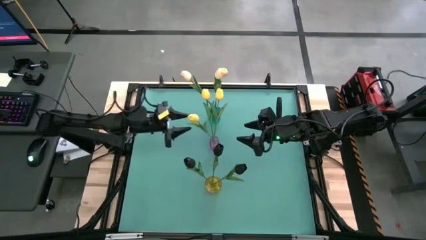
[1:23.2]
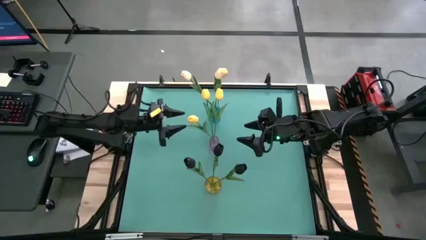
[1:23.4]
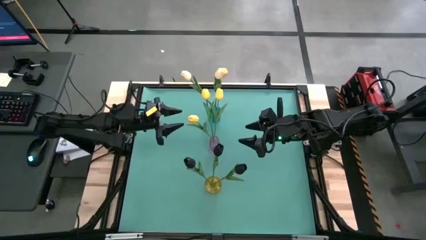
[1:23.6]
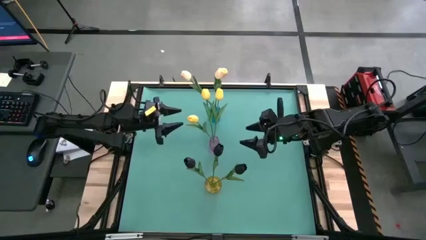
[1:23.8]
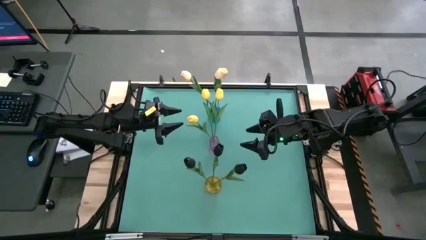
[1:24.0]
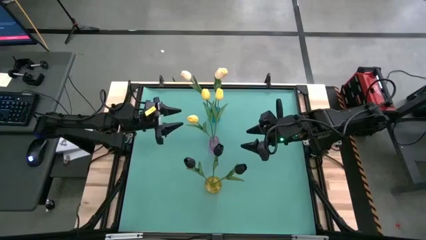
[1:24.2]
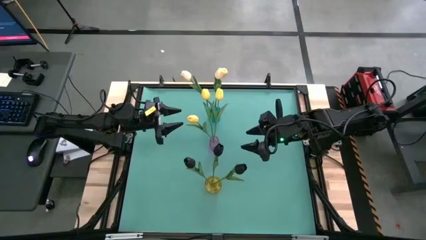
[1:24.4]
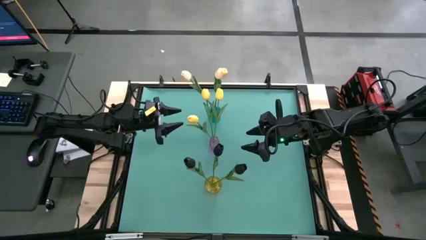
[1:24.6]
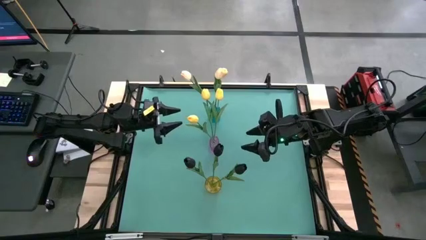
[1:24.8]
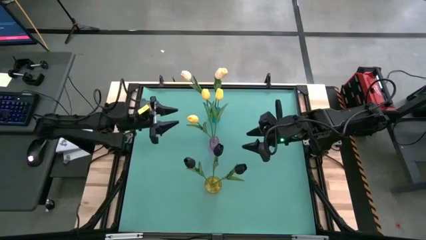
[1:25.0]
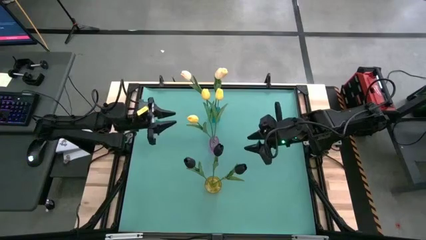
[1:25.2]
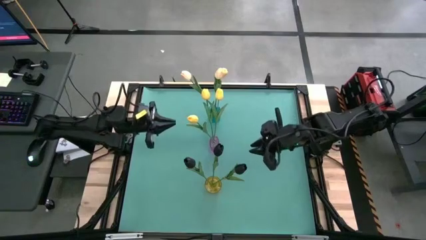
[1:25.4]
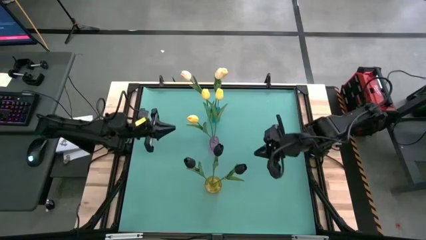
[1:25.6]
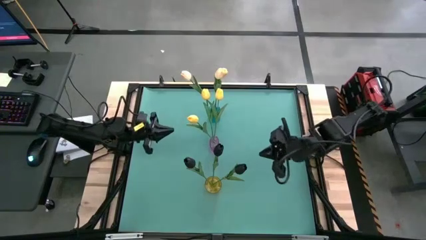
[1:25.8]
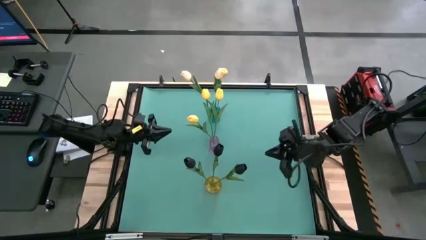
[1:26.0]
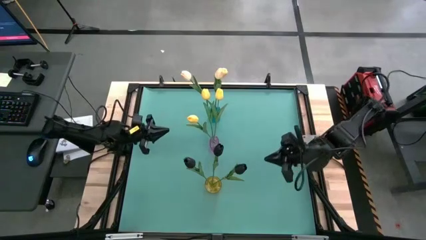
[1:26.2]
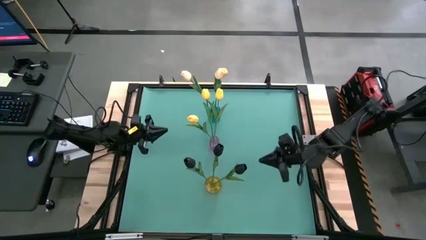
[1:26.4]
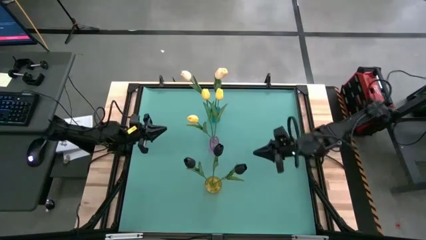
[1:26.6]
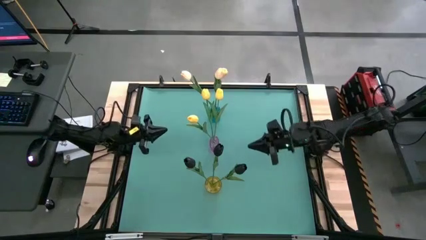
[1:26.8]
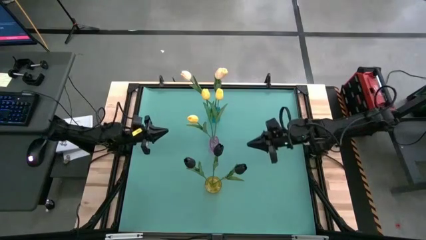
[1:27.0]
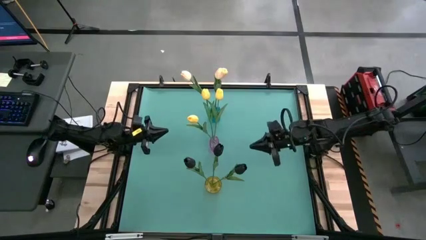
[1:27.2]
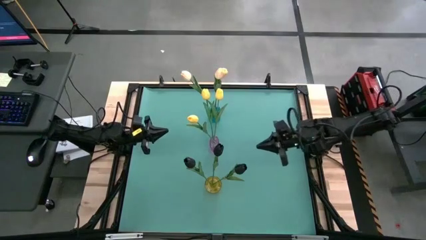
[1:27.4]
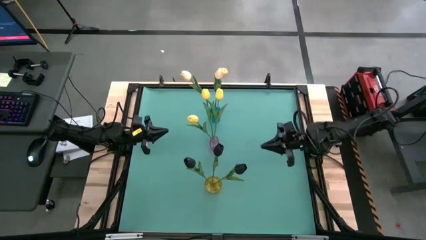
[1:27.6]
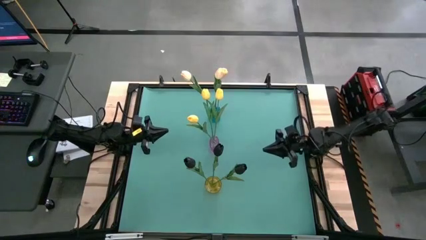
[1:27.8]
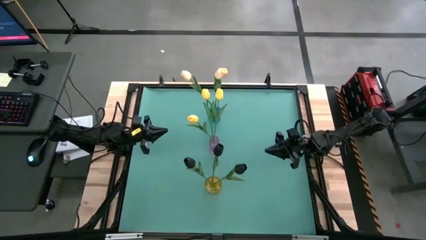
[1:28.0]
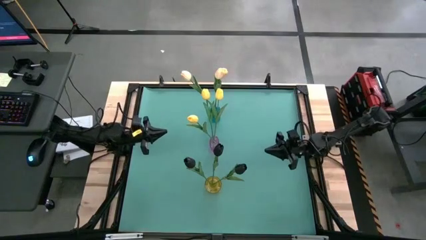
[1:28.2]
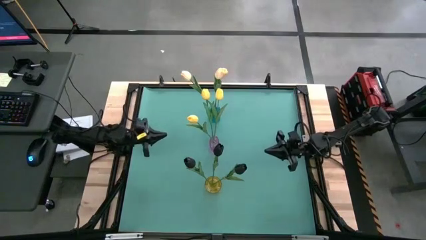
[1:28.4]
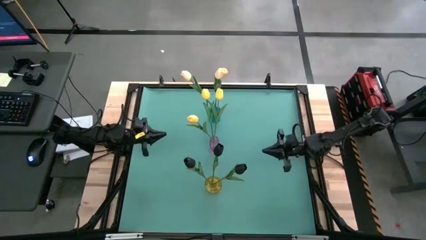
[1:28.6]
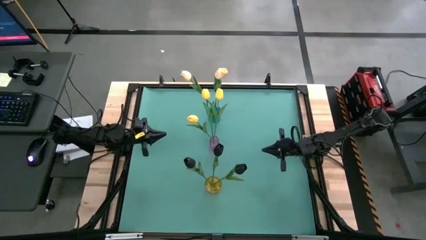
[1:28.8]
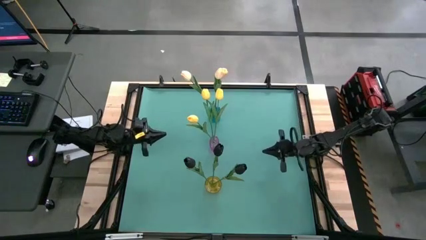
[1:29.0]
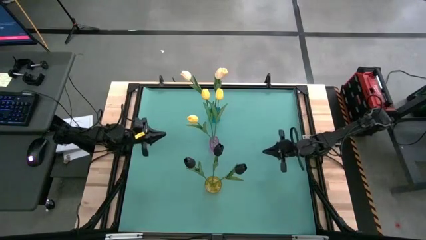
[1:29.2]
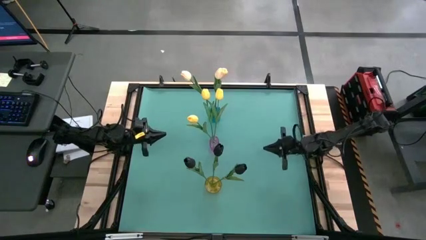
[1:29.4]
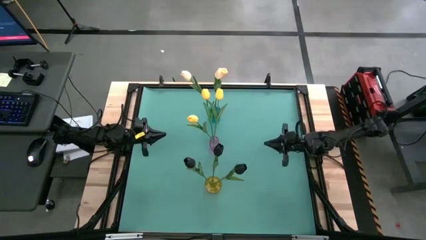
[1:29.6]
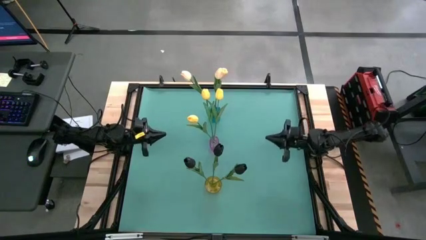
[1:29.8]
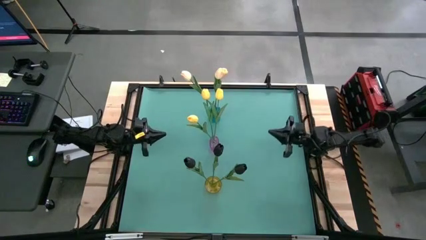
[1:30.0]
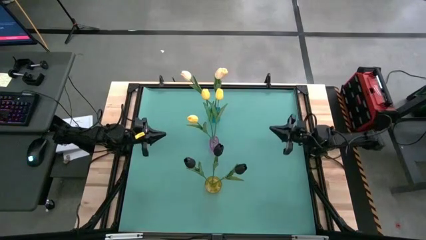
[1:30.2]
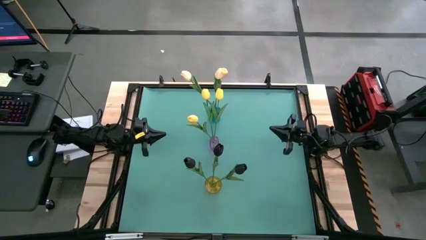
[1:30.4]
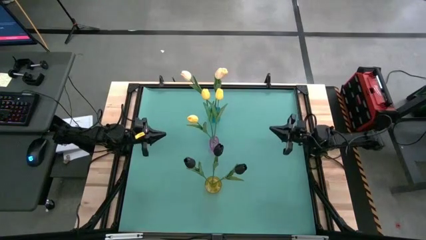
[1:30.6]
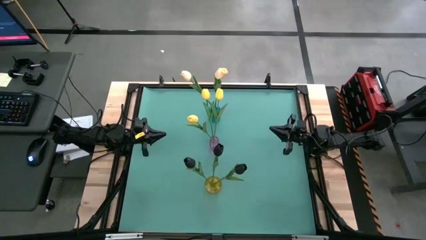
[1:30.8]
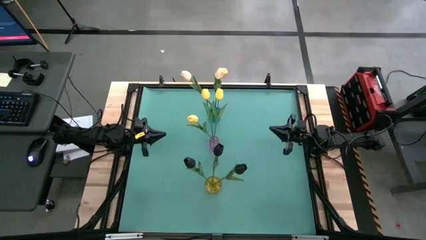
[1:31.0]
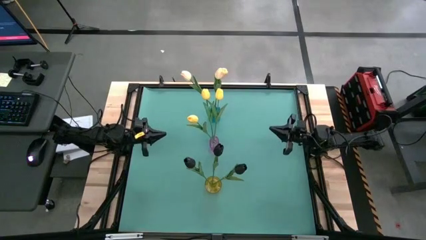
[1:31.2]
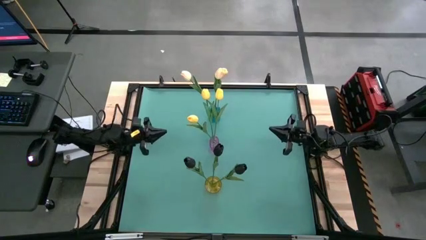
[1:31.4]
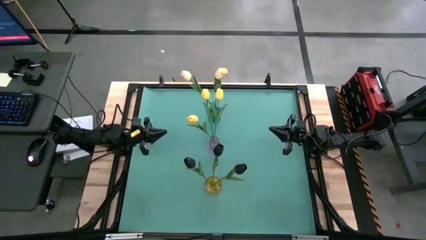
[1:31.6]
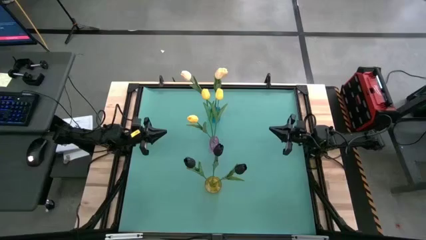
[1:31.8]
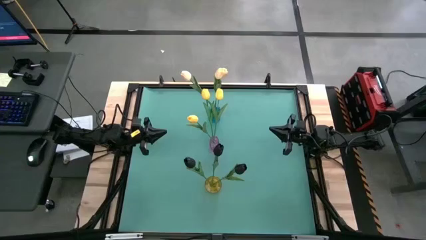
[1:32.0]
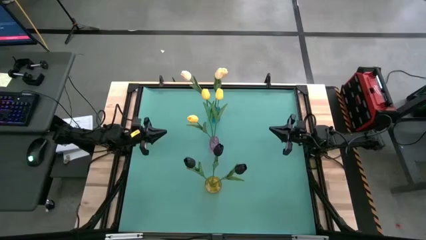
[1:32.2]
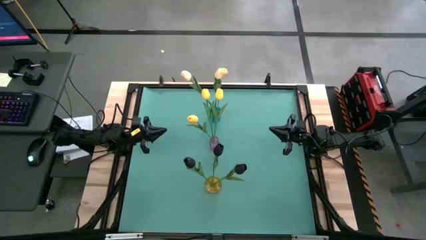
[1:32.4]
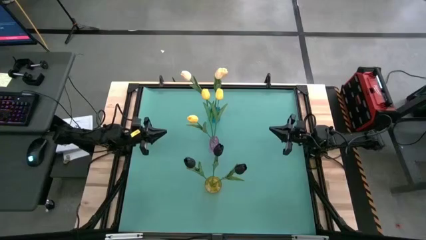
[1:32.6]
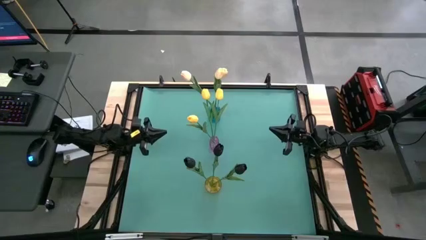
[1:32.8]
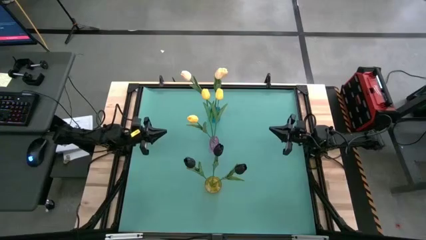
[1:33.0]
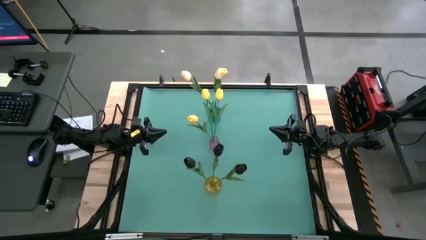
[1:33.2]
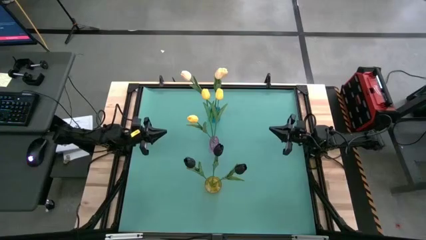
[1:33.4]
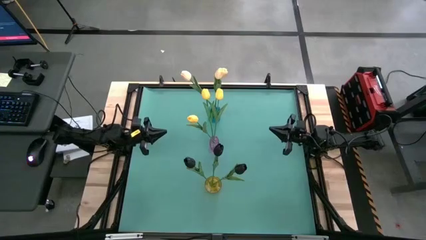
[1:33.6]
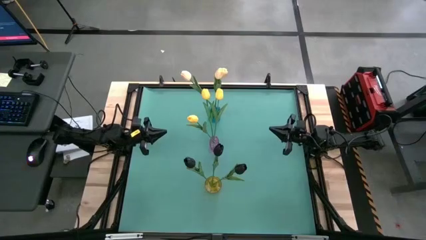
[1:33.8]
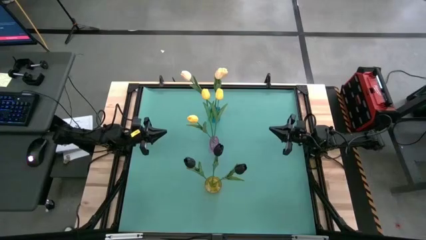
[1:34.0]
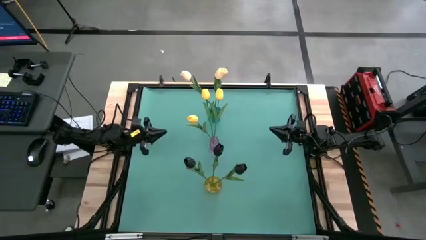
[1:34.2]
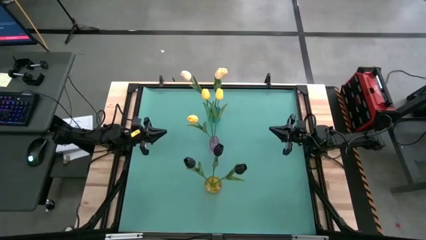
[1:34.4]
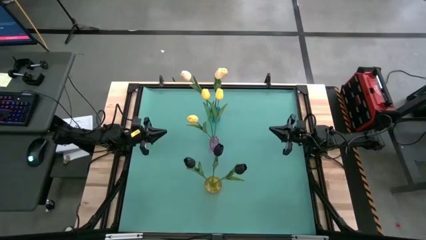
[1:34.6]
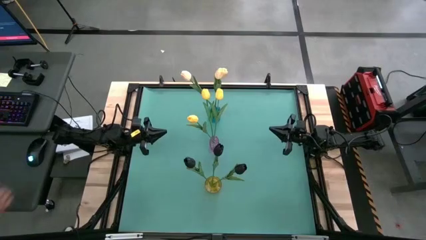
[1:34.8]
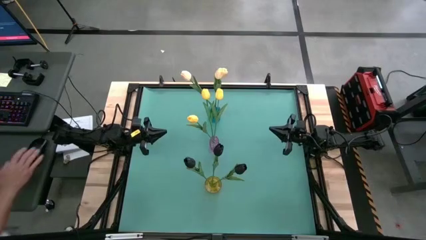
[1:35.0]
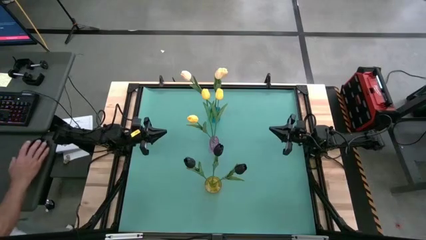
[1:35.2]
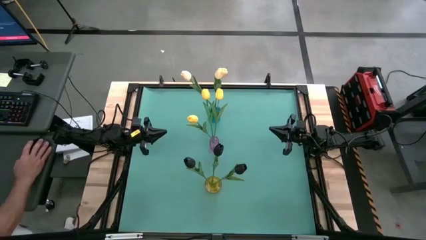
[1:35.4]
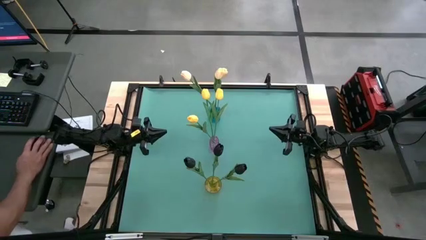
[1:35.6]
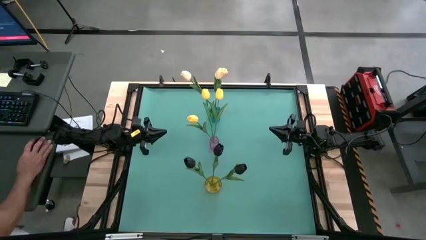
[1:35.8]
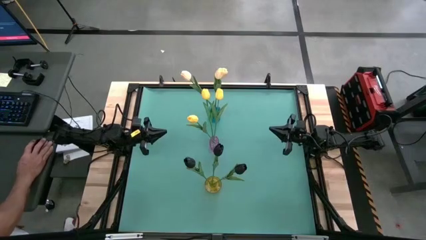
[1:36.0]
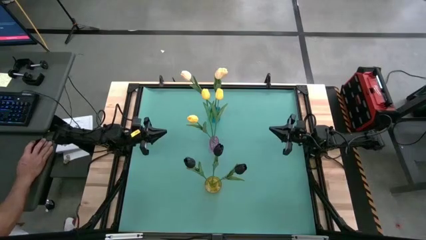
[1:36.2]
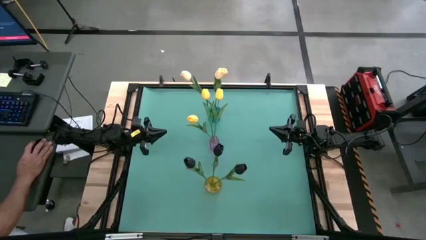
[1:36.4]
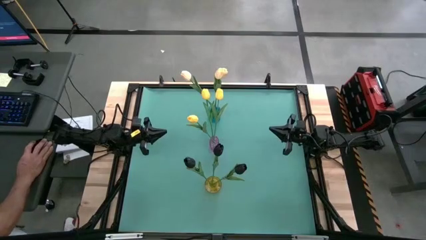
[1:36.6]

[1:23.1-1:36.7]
Task: Sort flowers into vase by color
Return to Home Position

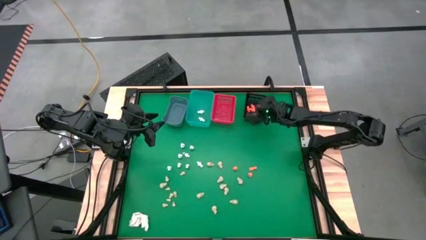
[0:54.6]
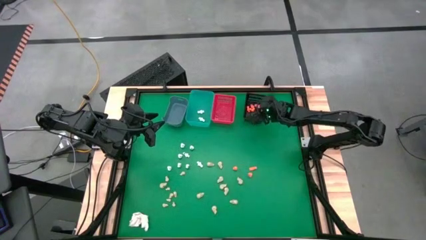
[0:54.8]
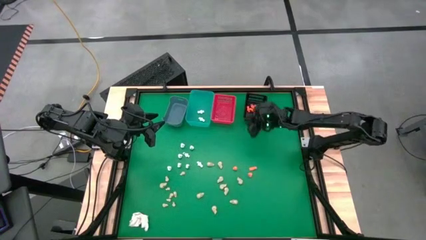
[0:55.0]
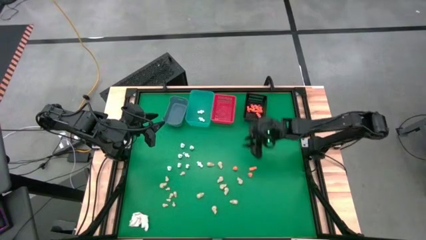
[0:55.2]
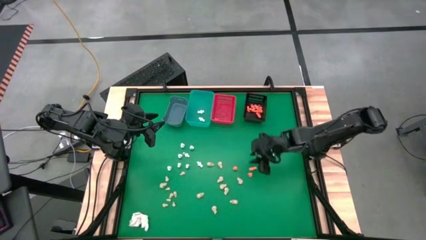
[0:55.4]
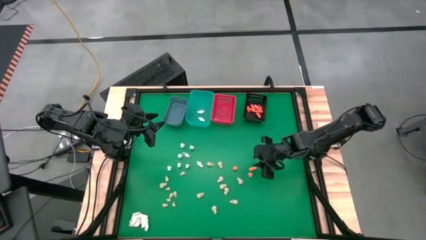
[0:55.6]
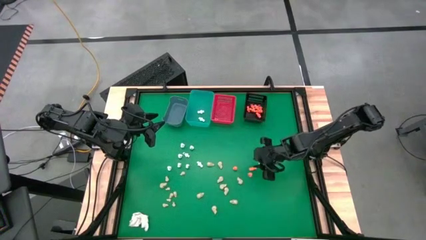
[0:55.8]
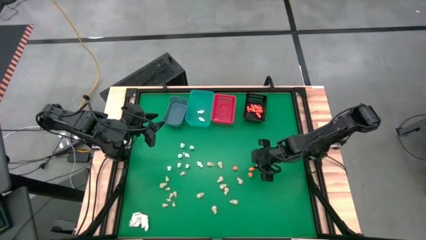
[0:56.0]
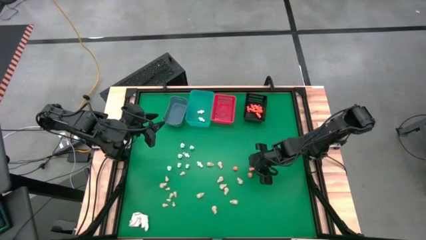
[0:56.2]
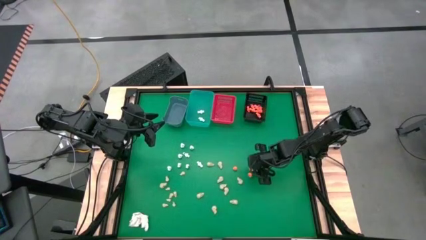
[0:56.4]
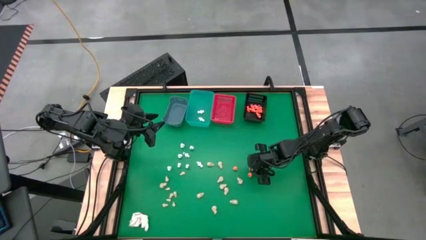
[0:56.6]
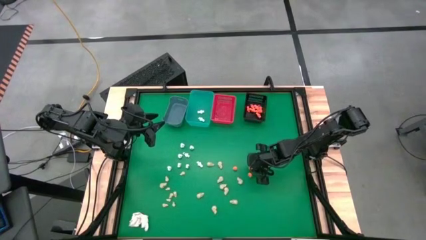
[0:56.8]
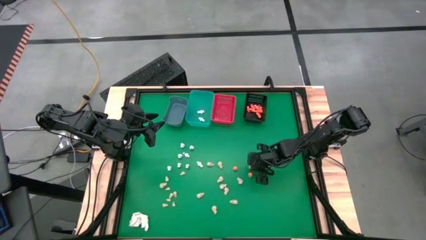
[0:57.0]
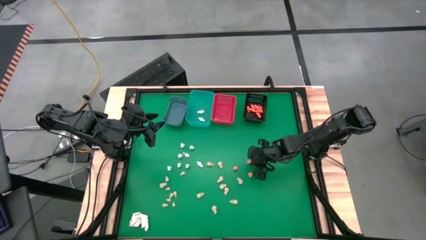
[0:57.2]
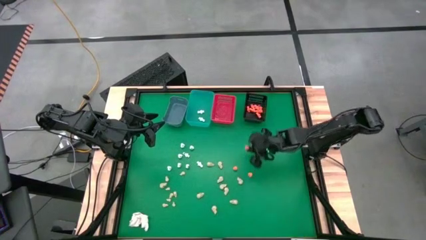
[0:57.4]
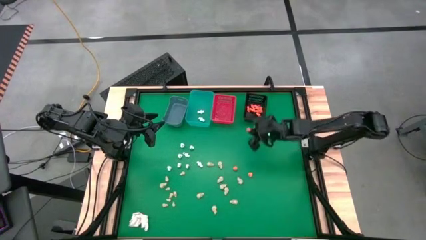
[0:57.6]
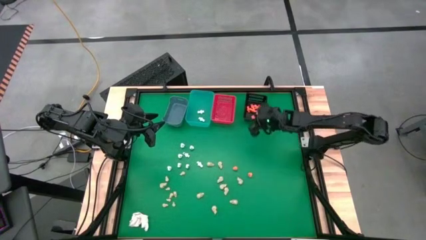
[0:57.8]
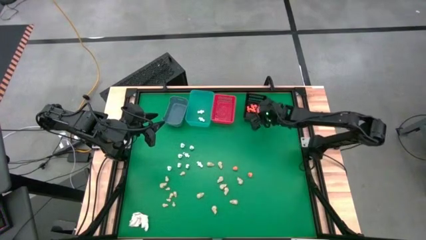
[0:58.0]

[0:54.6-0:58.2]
Task: Sort Halloween decoration
Put the orange skeleton toy into the black bin
